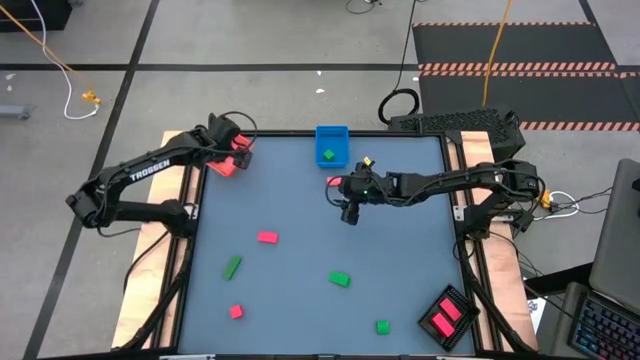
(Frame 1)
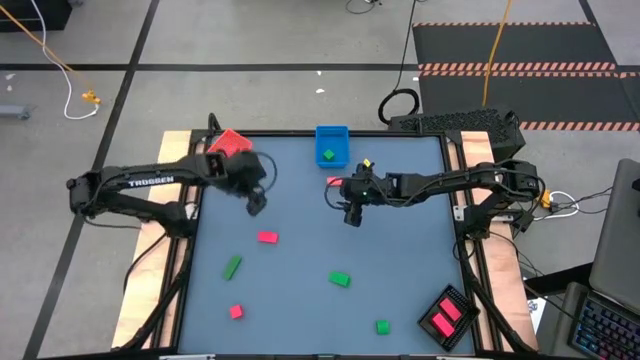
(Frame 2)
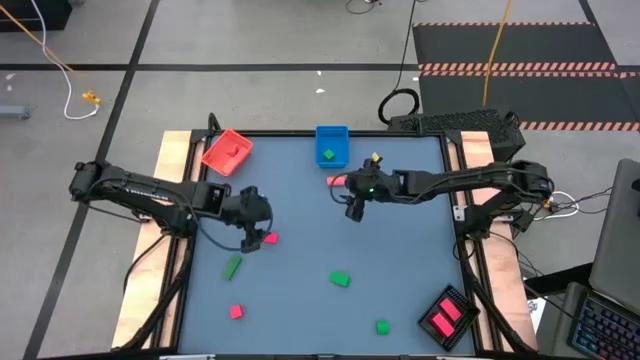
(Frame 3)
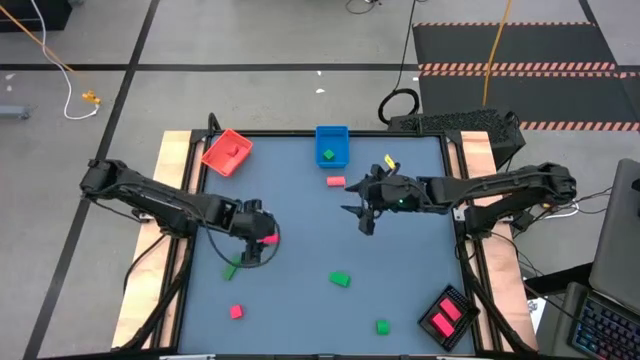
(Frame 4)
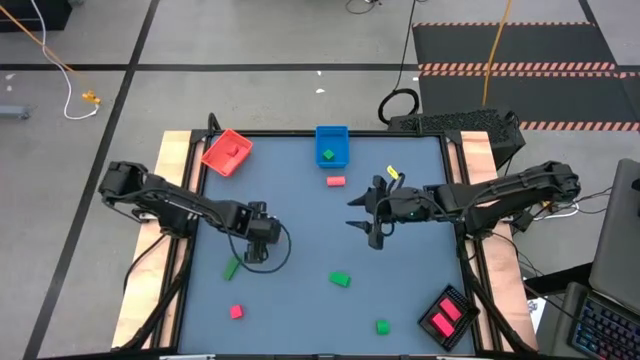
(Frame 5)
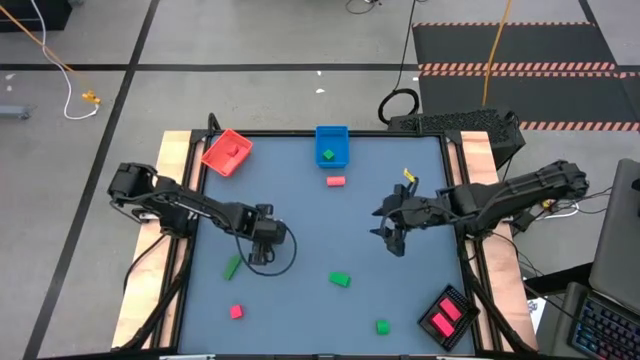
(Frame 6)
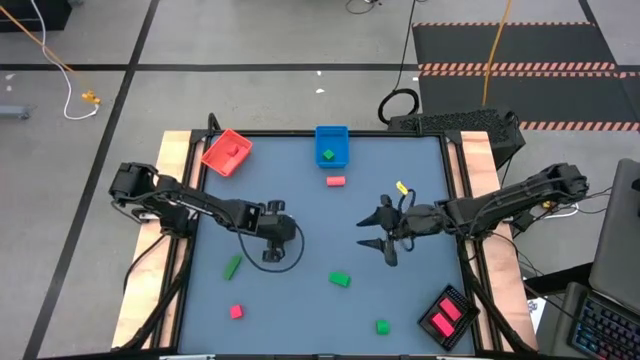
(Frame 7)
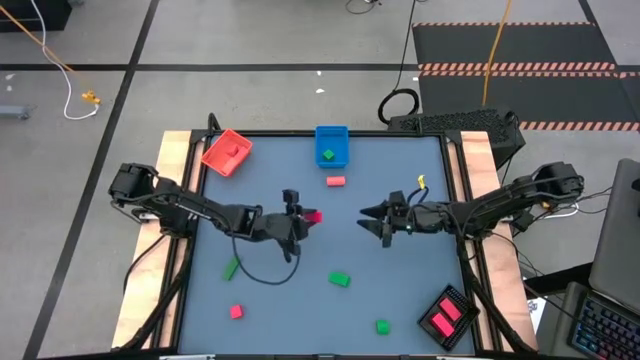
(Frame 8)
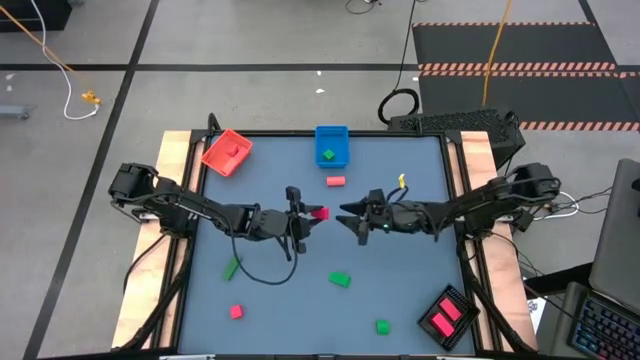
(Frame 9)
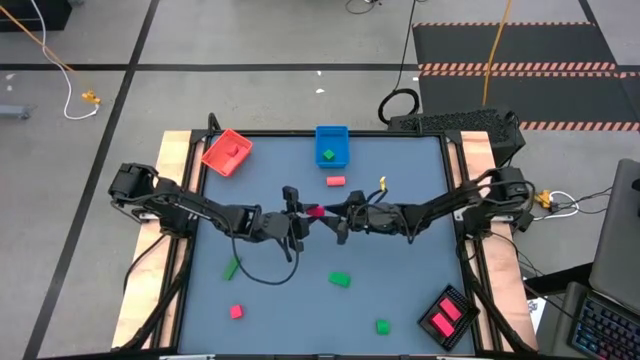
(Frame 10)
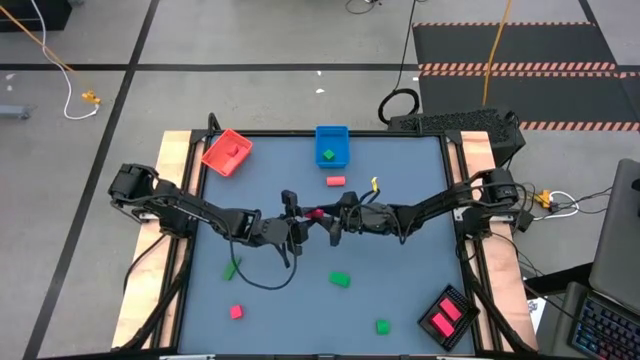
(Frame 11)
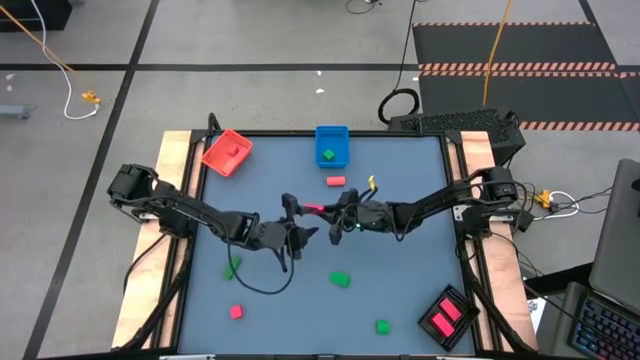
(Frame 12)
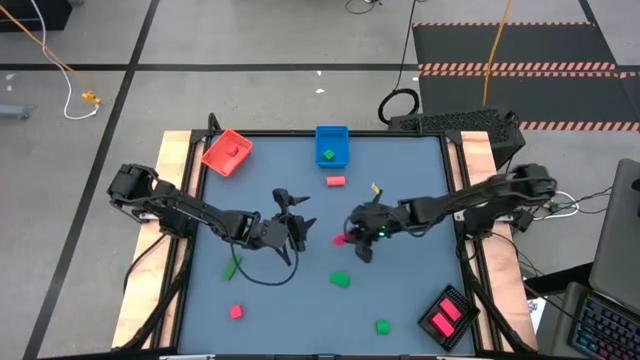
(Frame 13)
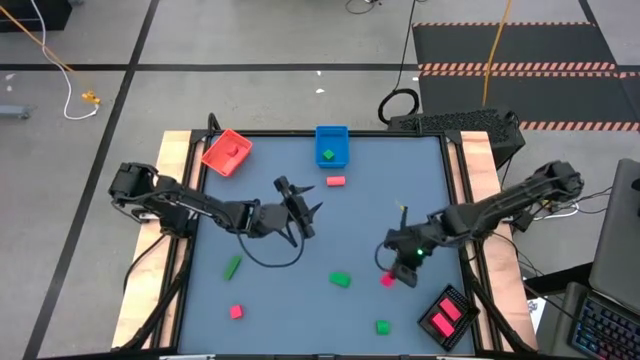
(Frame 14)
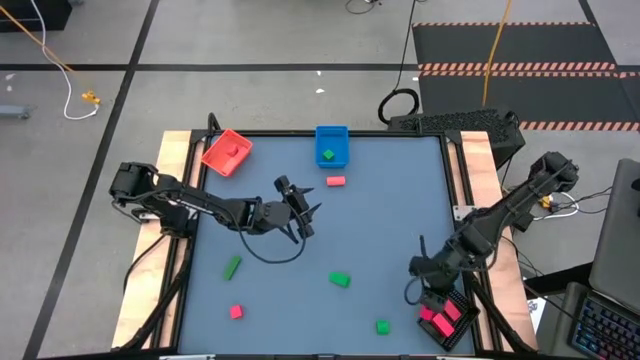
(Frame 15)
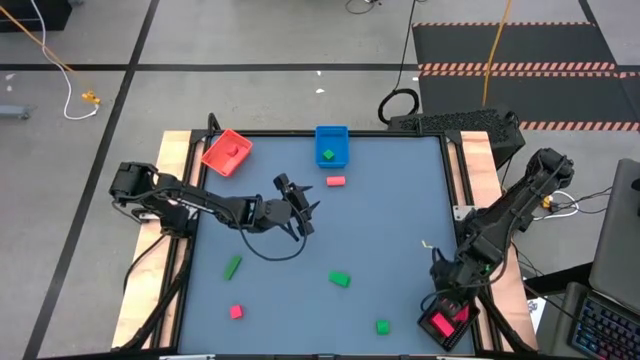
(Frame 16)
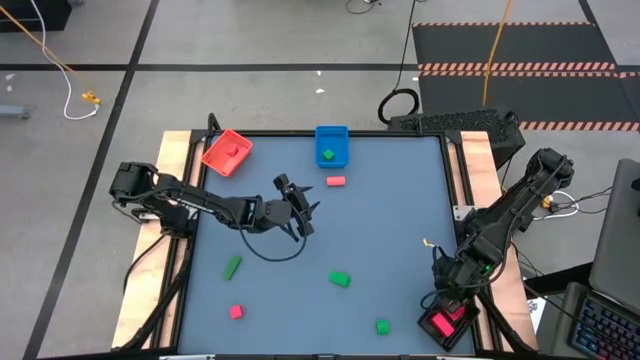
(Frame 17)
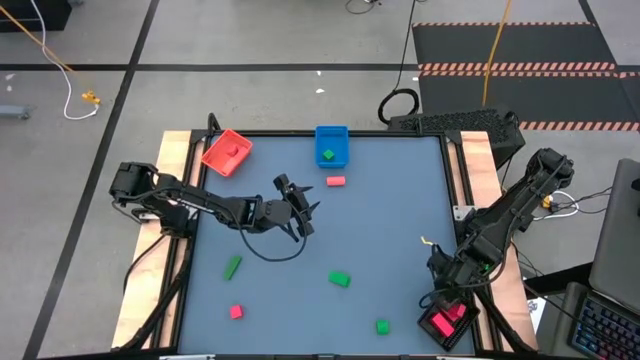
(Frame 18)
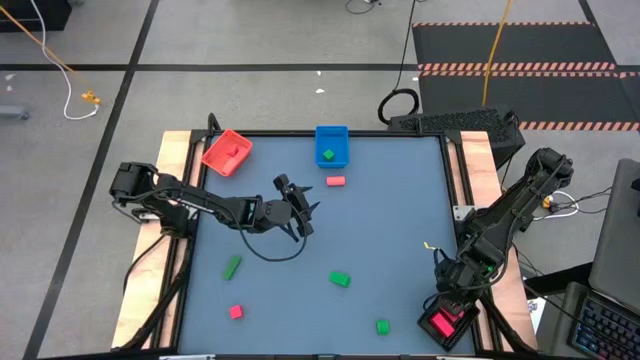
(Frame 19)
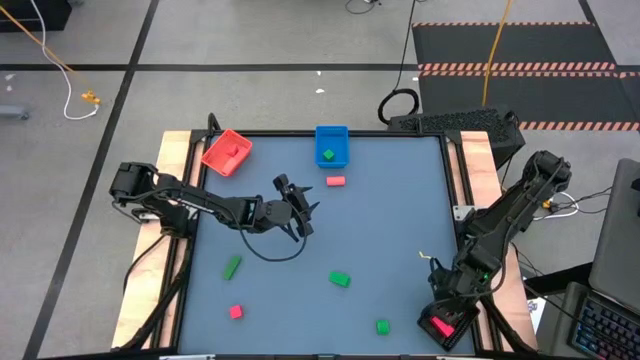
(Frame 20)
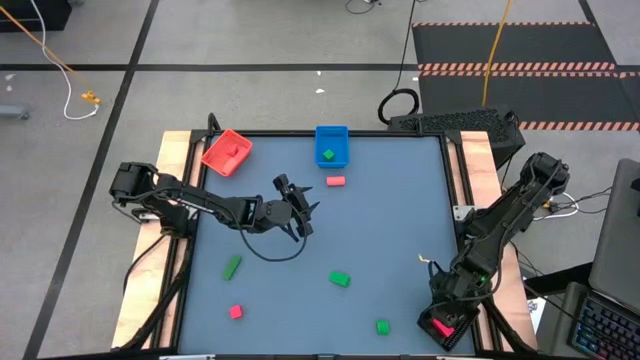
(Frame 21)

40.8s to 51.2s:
Task: Sort & place blocks by color
Put the red block into the black bin

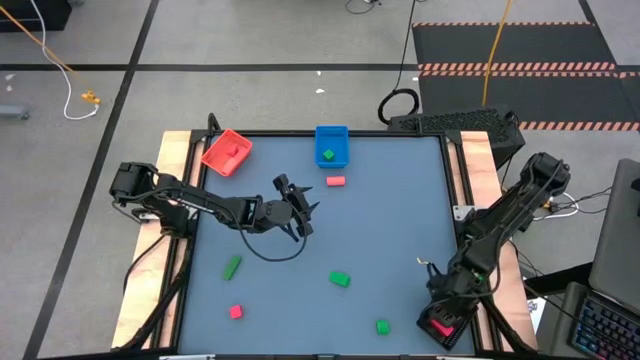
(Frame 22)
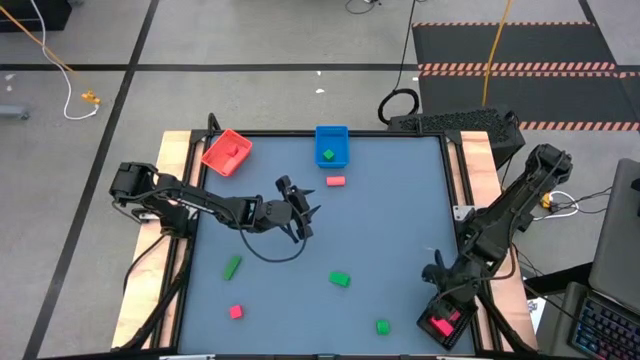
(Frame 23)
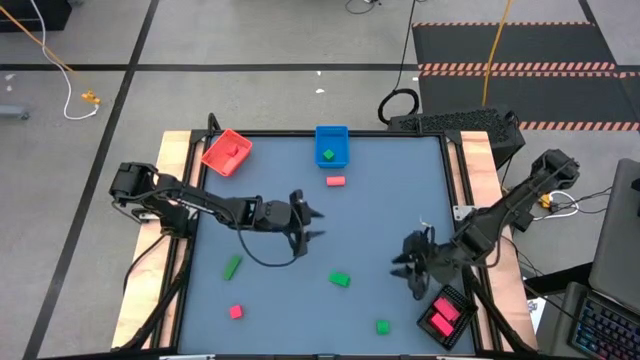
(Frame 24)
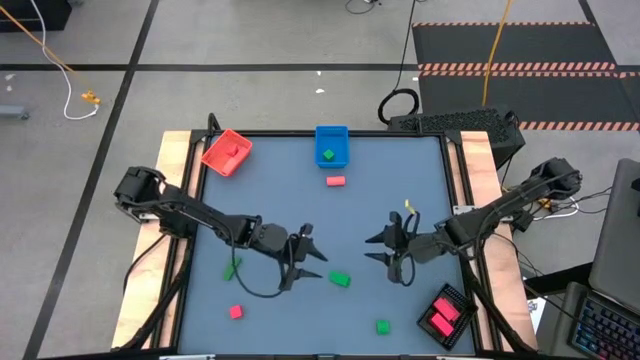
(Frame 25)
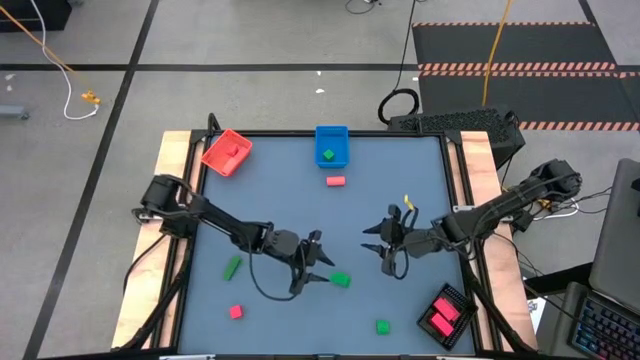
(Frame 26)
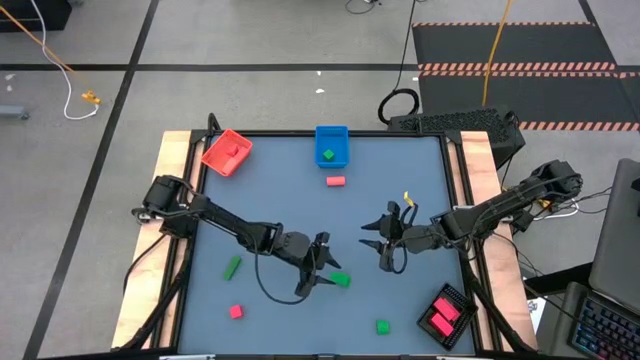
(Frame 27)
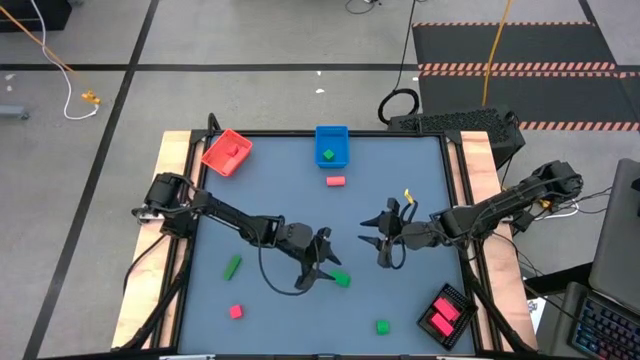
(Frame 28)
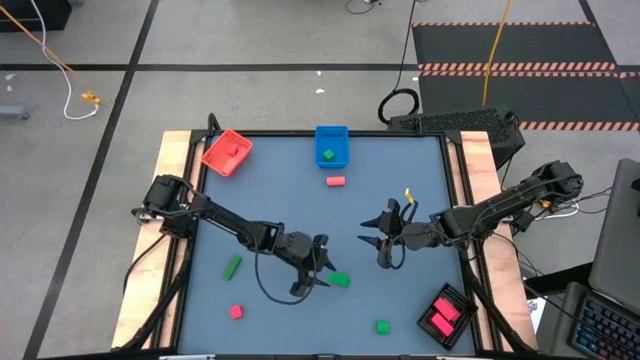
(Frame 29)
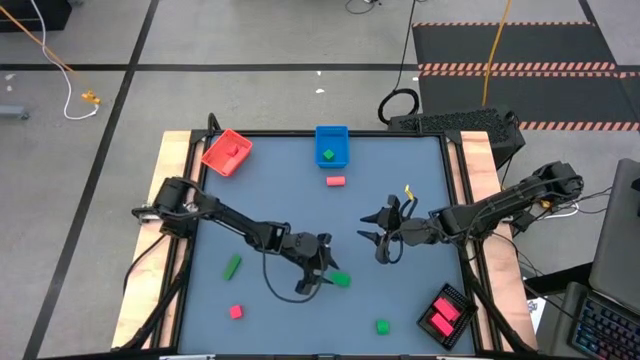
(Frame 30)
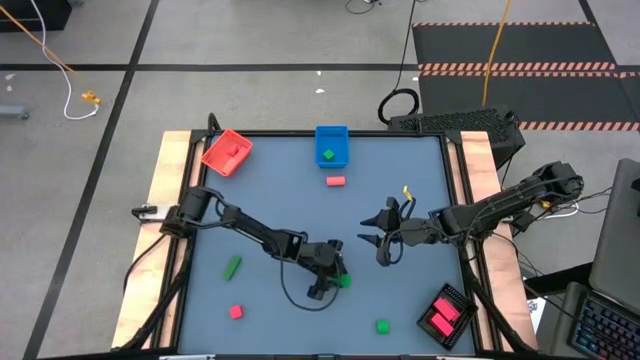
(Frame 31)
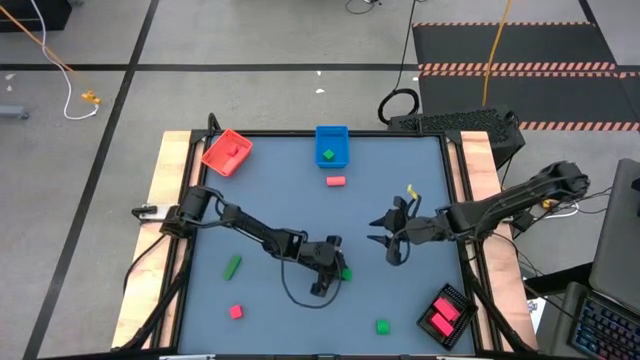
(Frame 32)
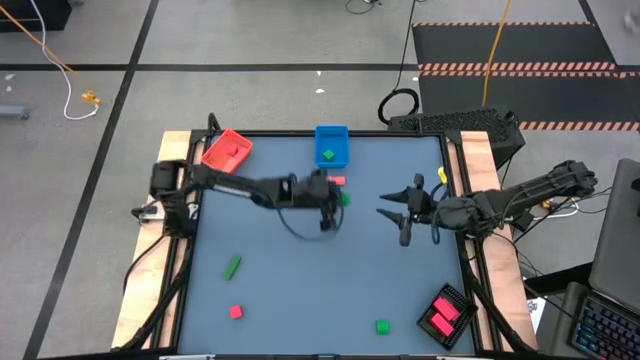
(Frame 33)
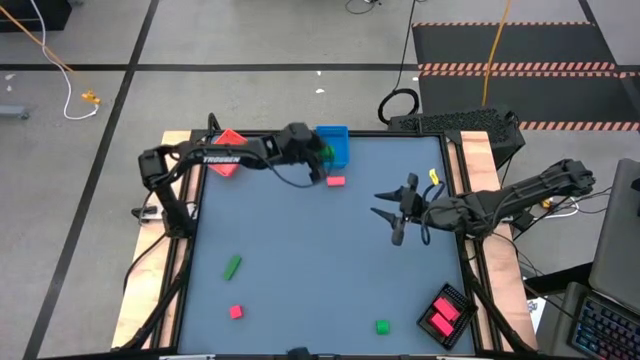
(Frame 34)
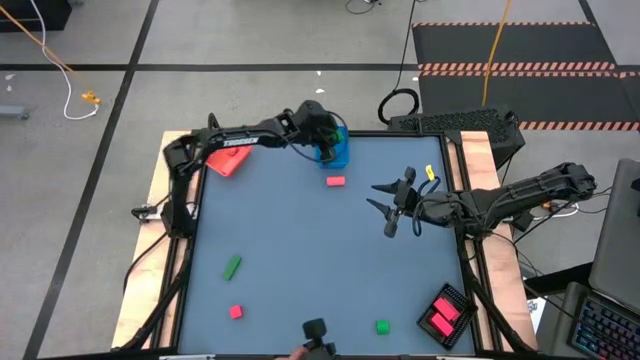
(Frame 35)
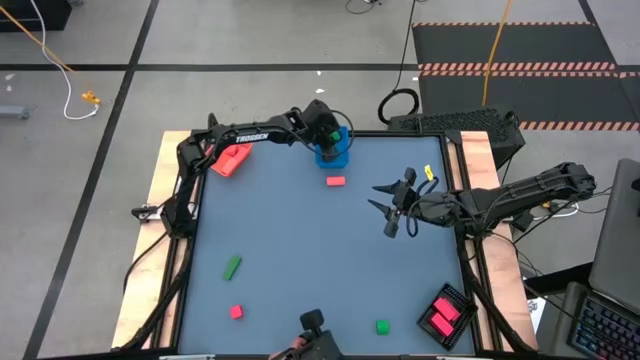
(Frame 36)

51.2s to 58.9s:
Put the green block into the blue bin

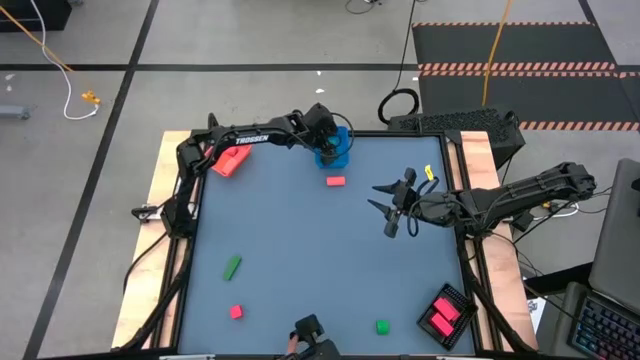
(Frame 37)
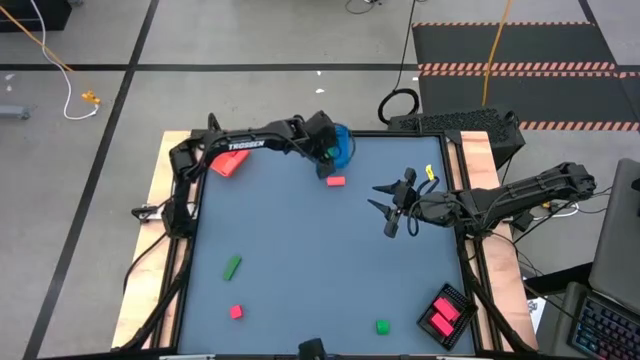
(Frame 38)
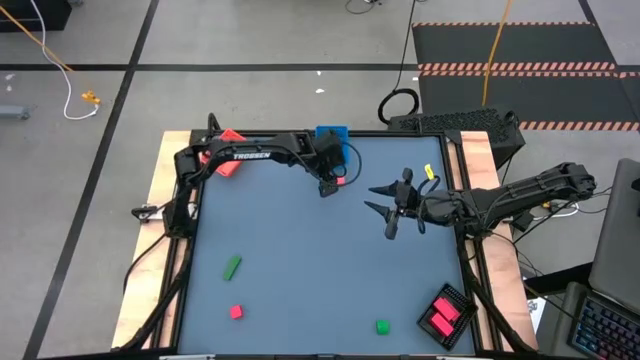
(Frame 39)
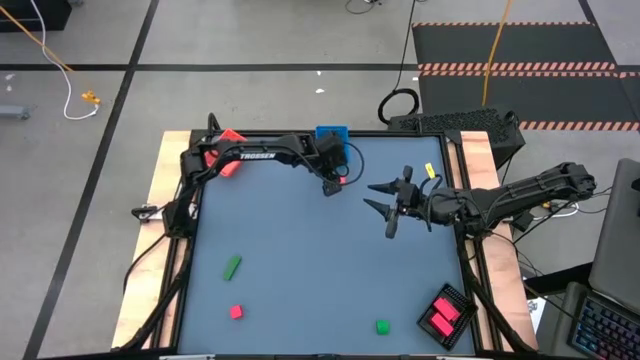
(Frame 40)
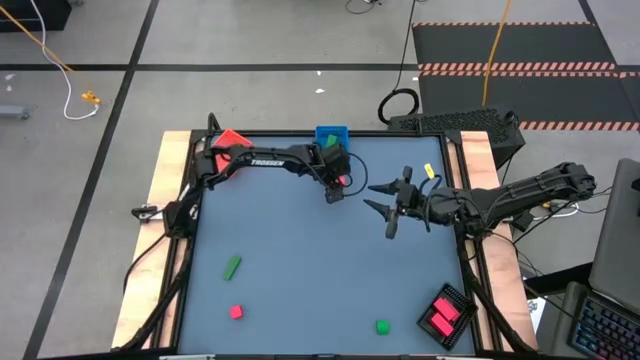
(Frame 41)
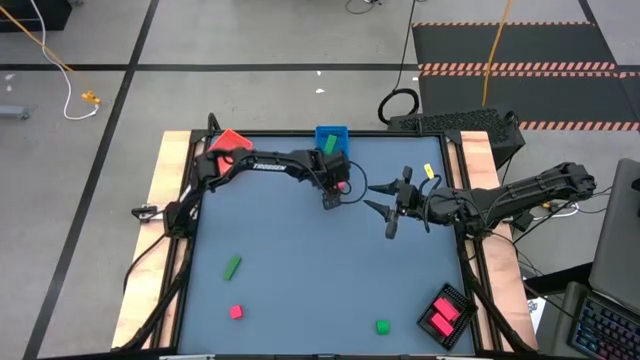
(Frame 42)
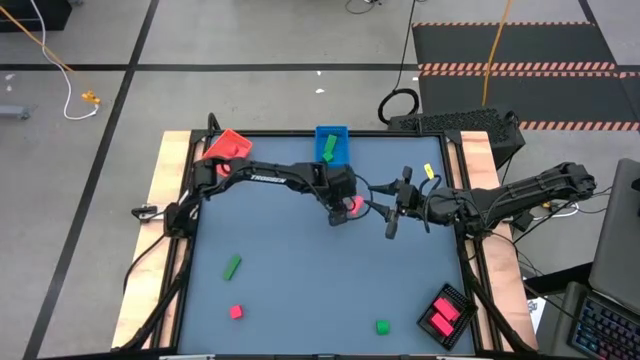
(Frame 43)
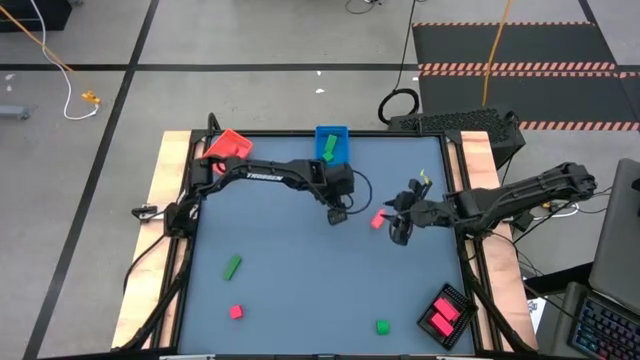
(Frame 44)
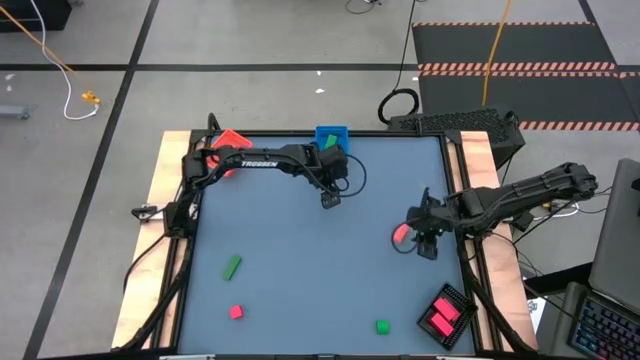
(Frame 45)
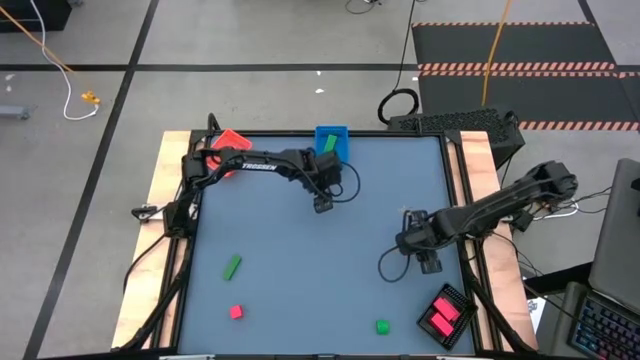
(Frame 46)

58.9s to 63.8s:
Put the orange block into the orange bin
